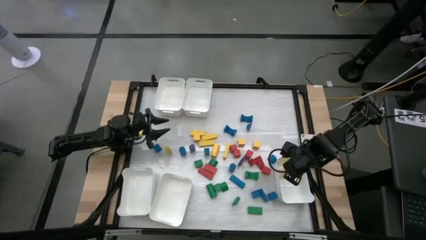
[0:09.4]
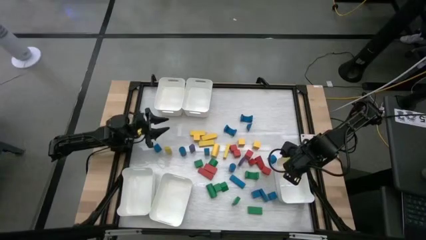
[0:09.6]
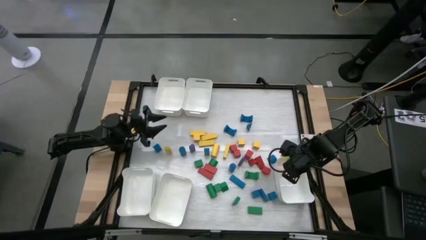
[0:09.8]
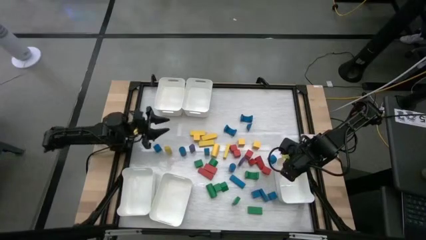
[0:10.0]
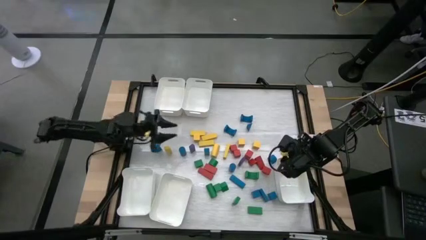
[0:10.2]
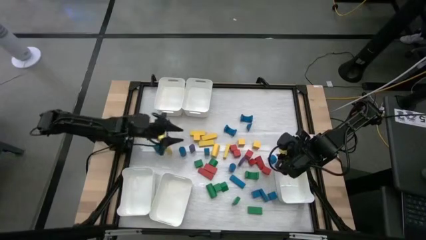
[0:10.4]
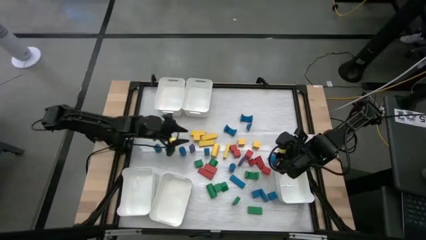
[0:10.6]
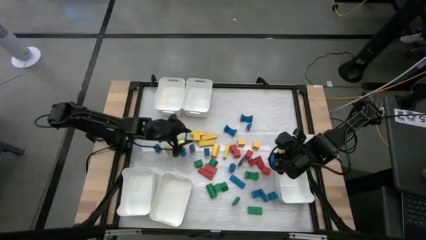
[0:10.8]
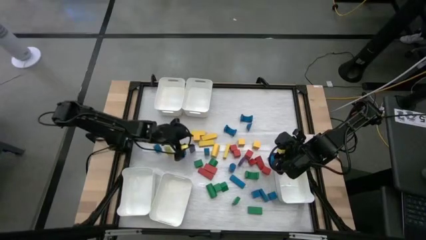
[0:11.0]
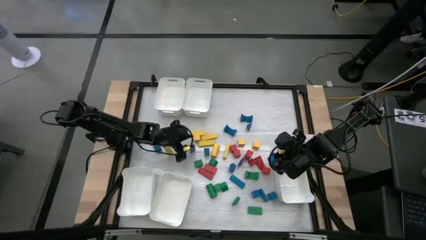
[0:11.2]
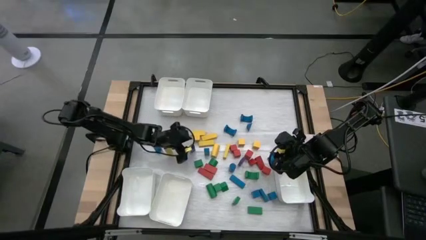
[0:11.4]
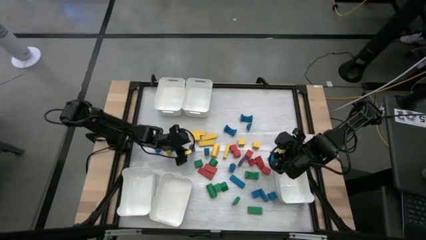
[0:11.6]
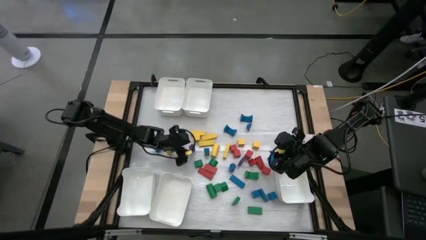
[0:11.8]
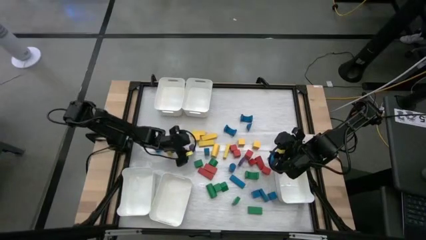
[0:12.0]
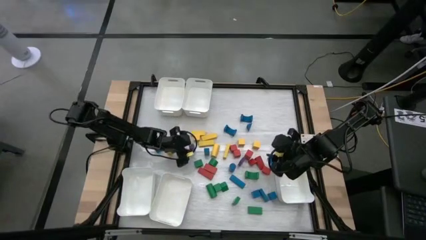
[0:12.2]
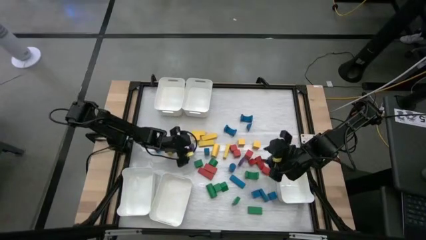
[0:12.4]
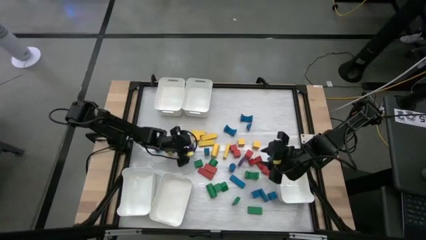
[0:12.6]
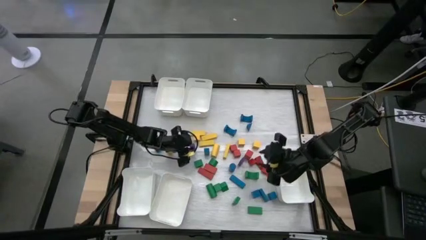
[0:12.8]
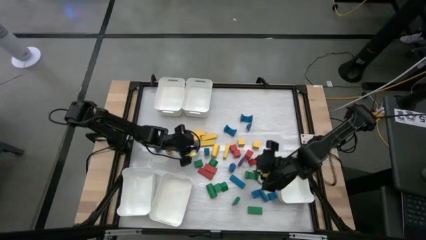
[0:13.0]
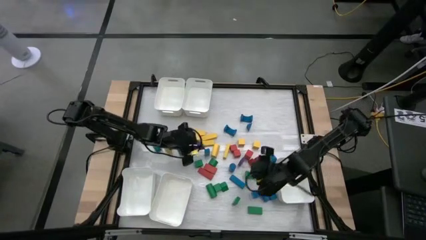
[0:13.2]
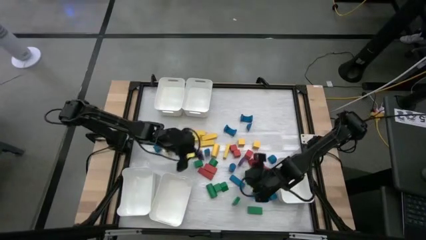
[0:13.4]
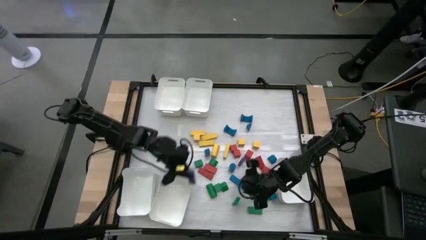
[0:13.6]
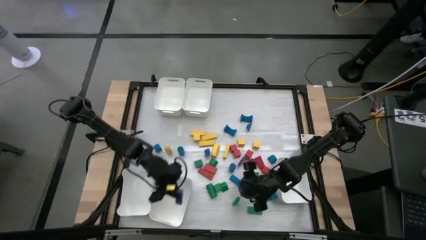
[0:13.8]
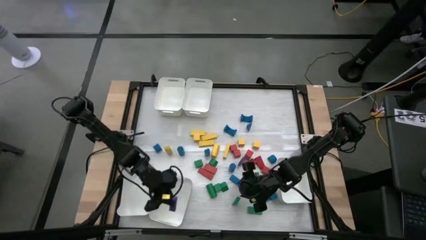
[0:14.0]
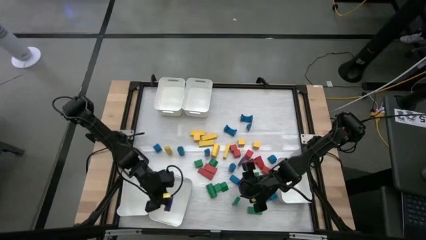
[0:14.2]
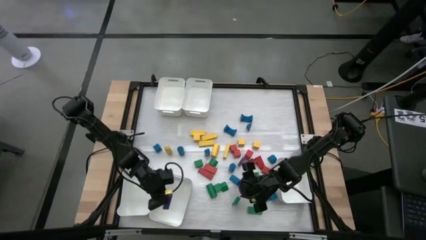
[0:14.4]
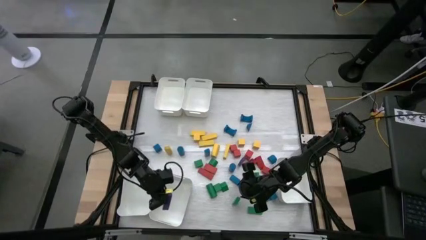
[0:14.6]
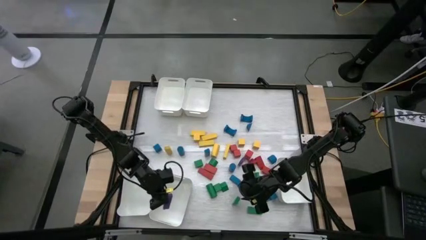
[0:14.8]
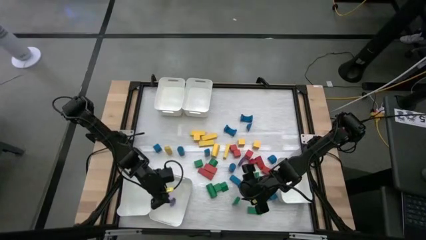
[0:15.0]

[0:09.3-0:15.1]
Task: Sort blocks
Put the purple block into the middle white bin

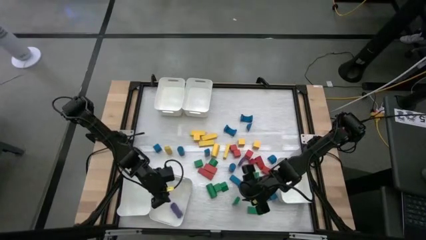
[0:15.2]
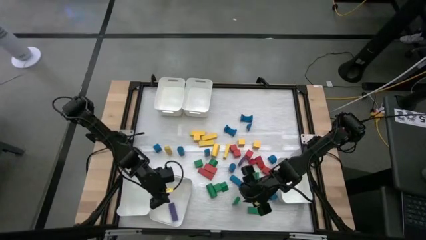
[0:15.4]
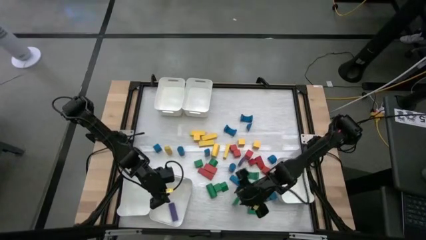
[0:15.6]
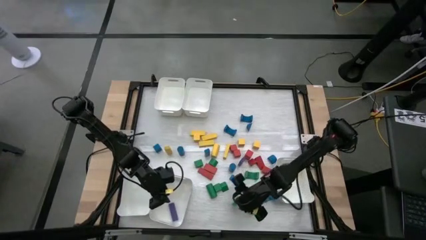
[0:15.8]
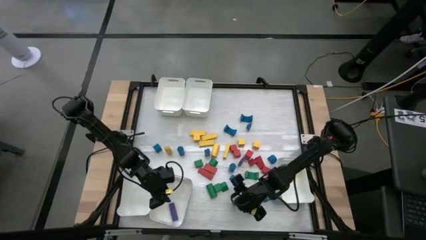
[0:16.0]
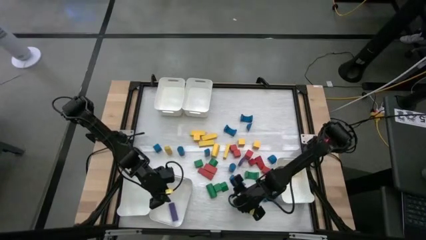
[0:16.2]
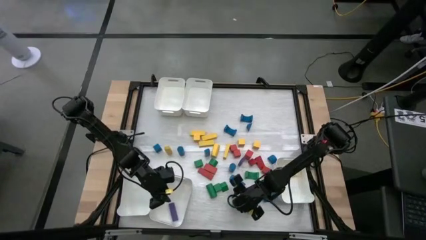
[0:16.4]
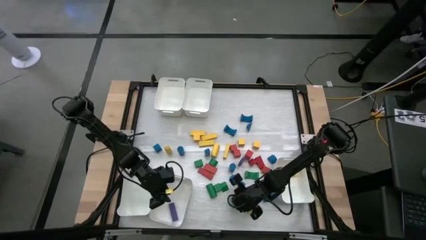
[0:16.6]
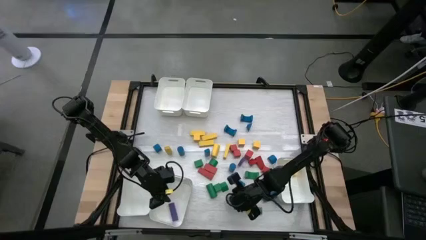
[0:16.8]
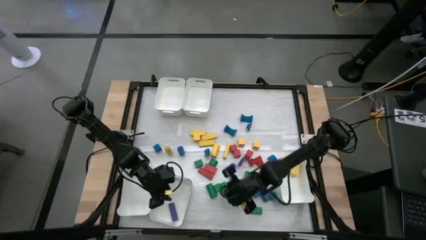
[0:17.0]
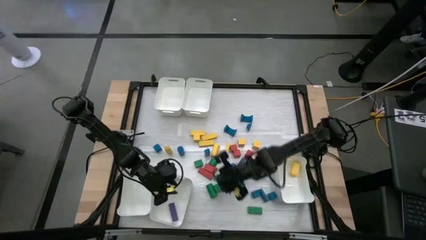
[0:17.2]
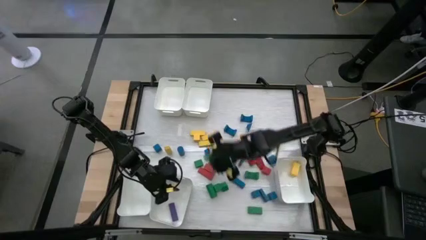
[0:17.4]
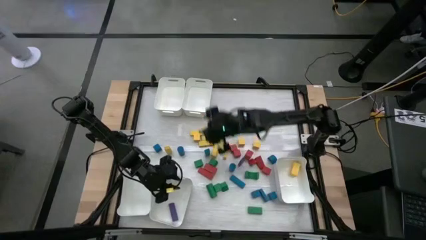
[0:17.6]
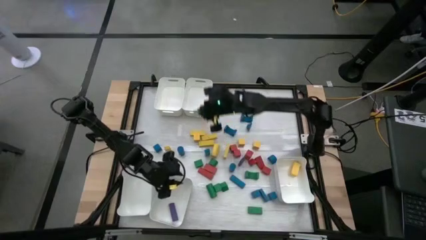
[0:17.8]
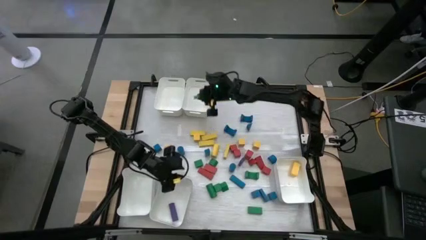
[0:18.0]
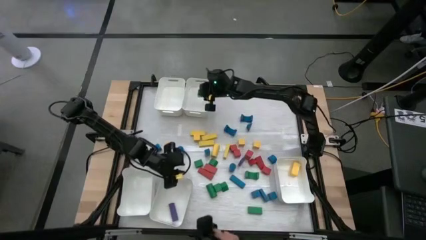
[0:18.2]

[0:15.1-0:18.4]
Put the green block into the top right white bin

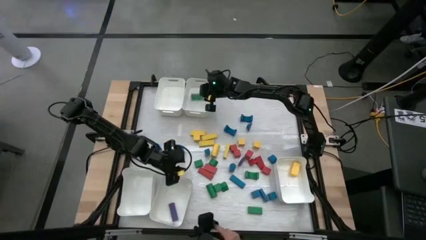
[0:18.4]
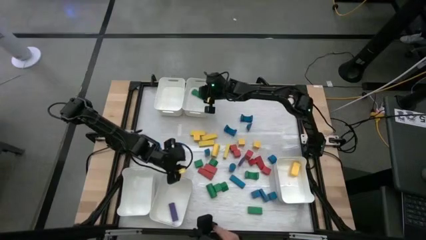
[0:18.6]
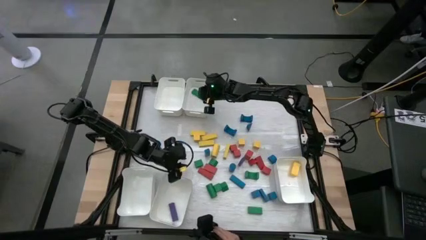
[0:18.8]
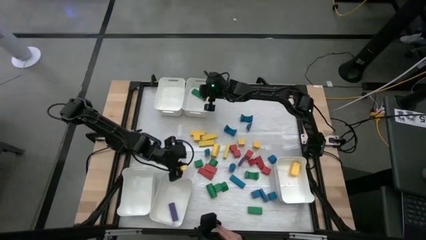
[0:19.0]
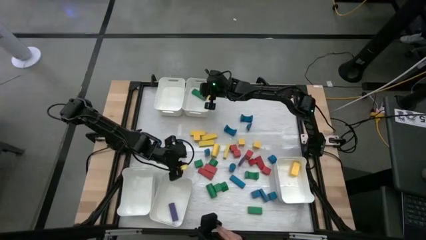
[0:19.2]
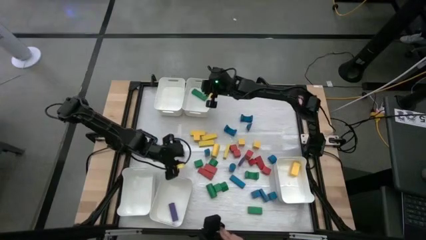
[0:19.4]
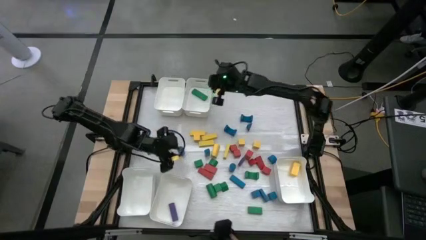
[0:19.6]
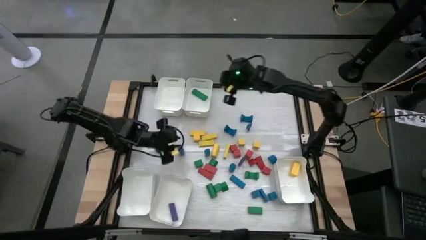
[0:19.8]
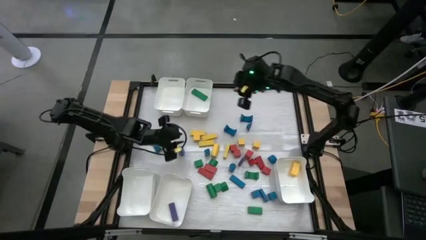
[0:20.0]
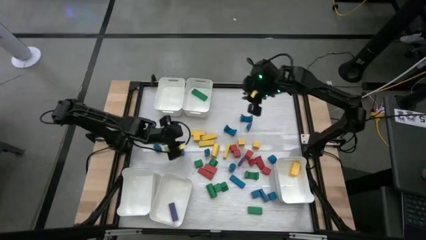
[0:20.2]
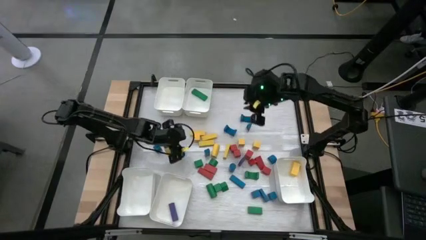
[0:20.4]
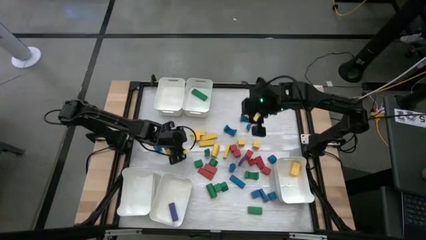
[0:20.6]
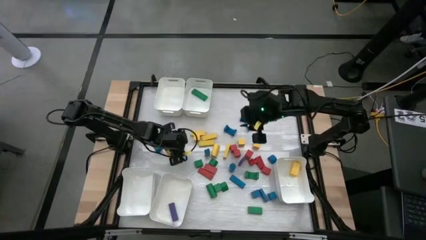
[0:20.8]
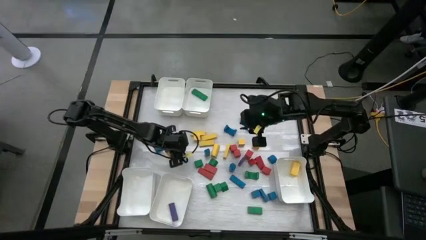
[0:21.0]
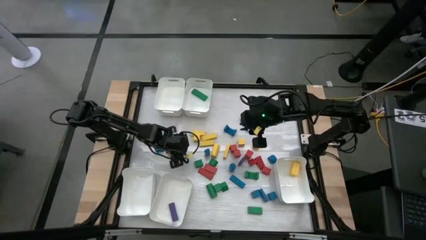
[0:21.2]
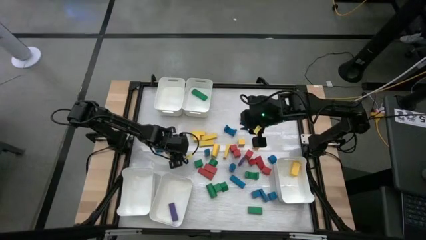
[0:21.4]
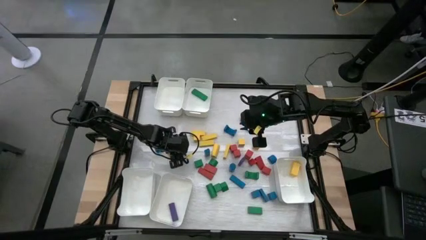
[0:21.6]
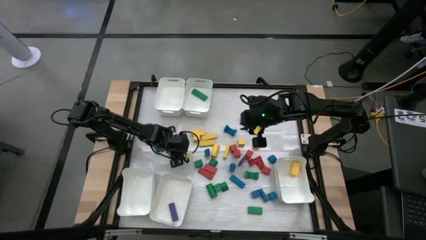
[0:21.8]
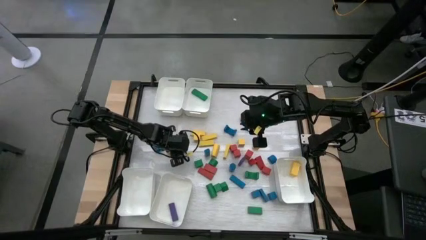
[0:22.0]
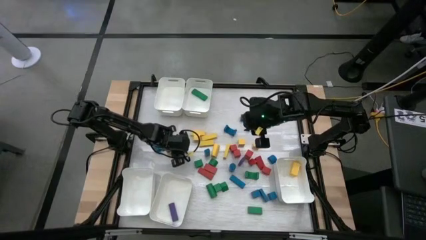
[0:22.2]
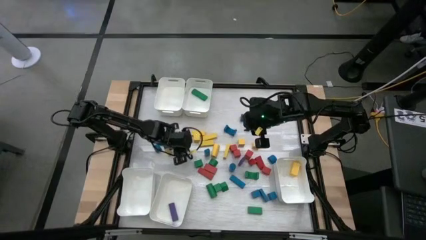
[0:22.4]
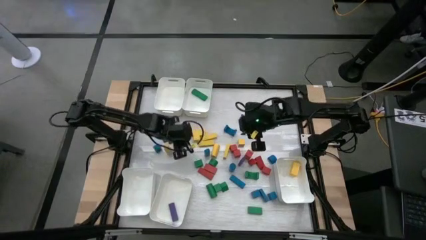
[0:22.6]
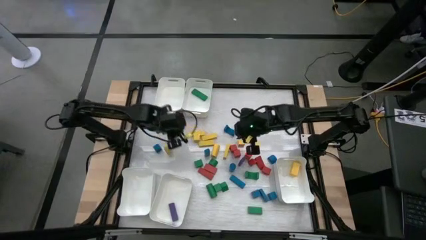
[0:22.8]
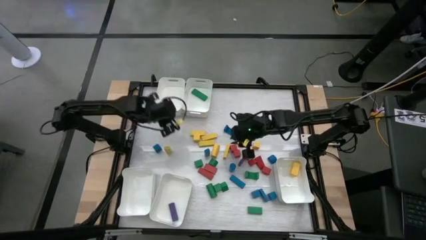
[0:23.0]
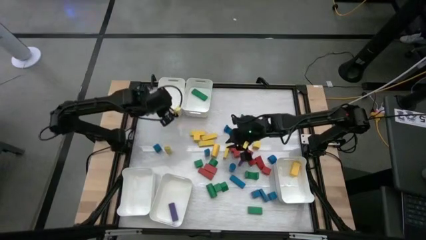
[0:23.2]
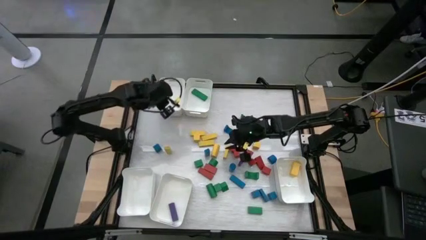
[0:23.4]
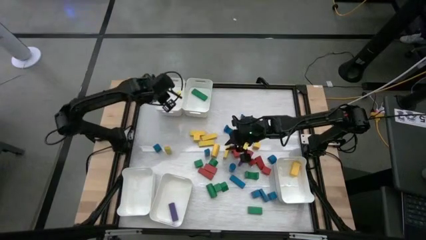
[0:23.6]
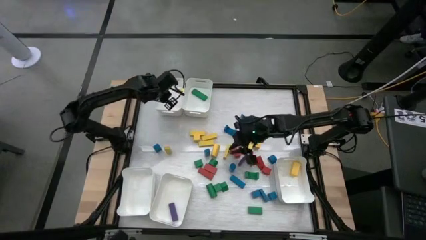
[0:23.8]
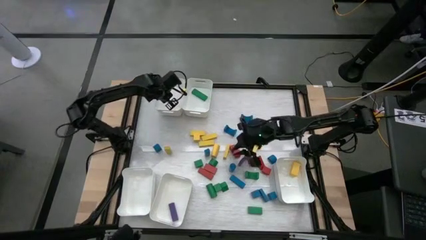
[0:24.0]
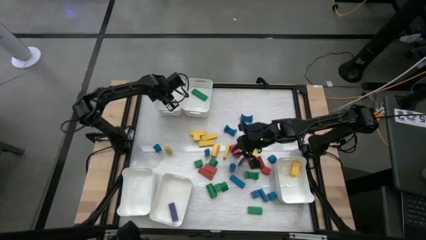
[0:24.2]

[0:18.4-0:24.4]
Put the blue block into the top left white bin

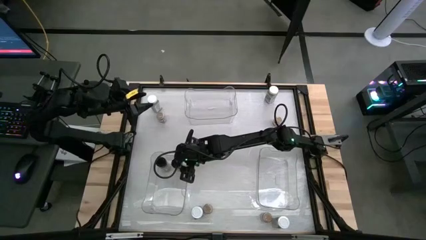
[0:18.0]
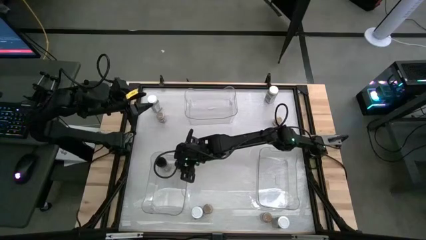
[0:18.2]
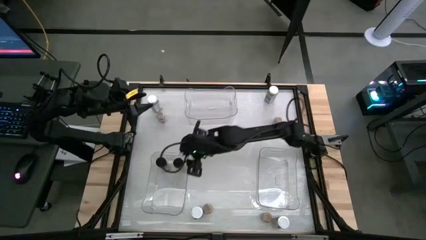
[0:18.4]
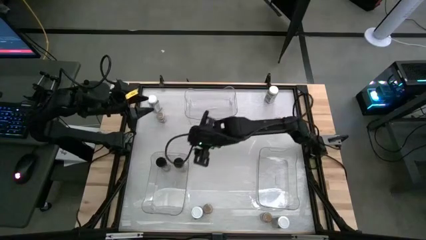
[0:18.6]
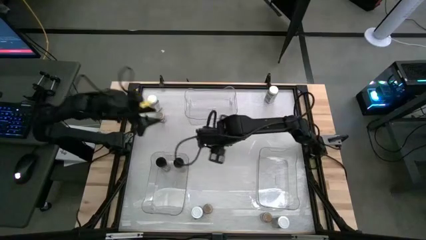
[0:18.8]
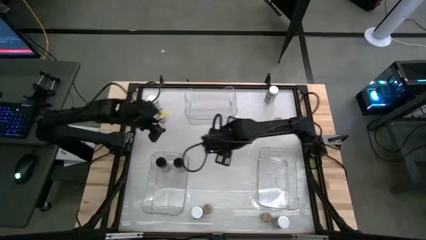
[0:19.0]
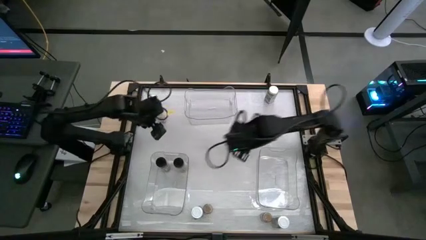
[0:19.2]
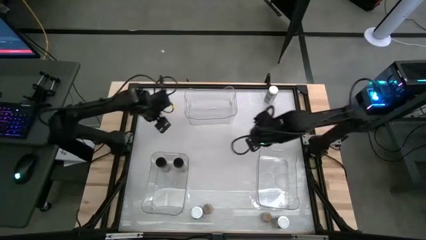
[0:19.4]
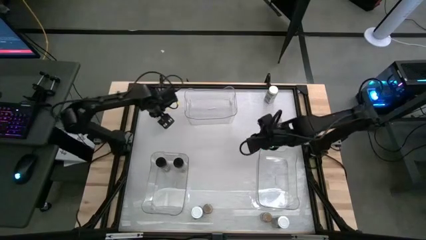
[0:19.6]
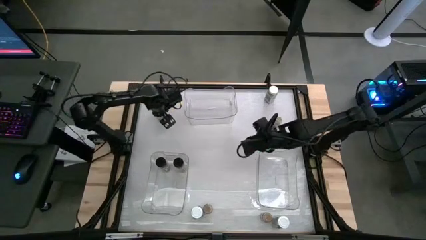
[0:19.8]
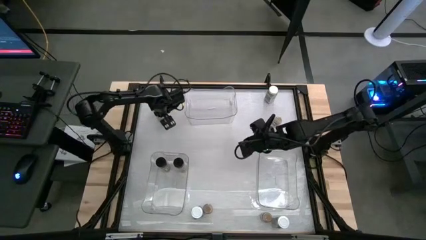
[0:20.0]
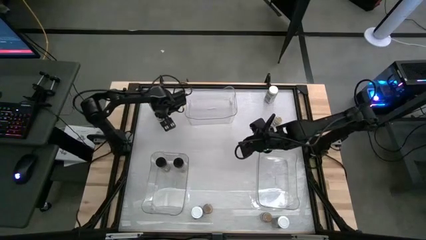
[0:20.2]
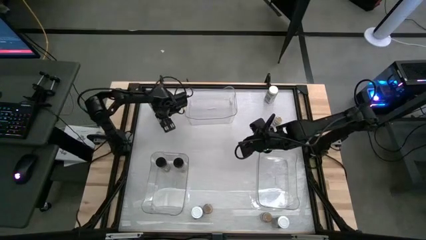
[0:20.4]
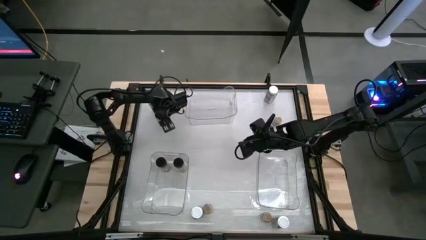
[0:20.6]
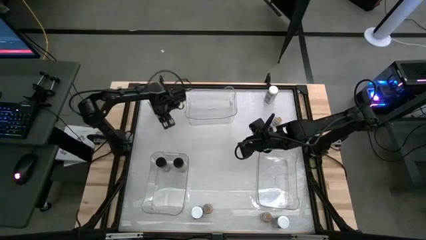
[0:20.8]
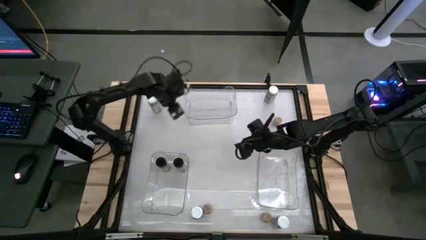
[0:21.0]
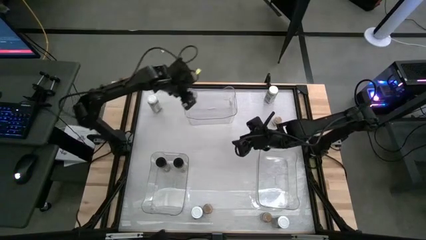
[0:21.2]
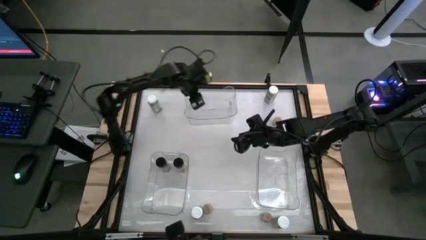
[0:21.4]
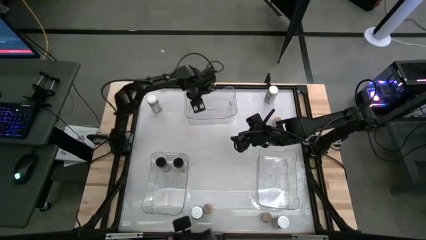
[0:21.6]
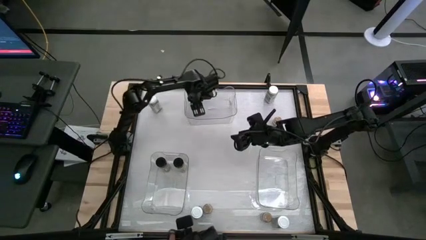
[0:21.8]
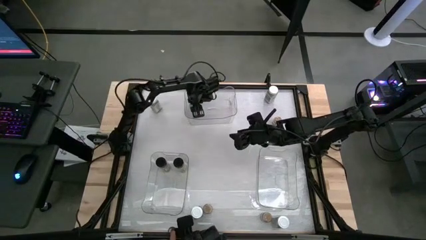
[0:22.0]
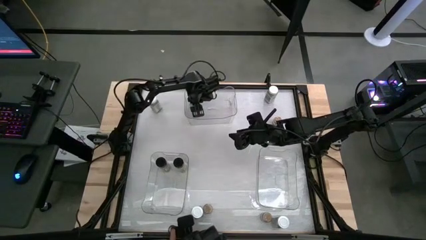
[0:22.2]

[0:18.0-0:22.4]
Task: Sort spices by type
Put the brown seasoning bottle into the middle transparent bin
